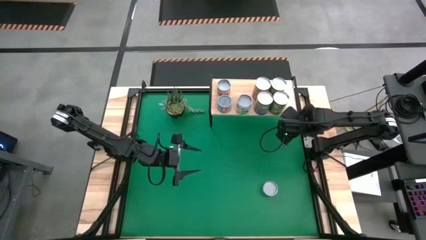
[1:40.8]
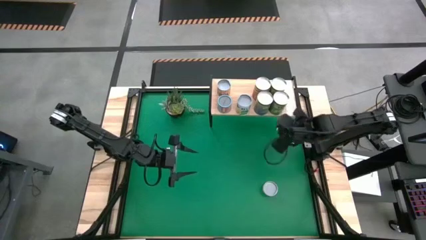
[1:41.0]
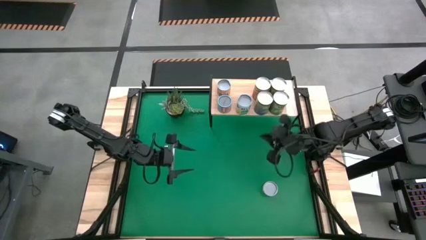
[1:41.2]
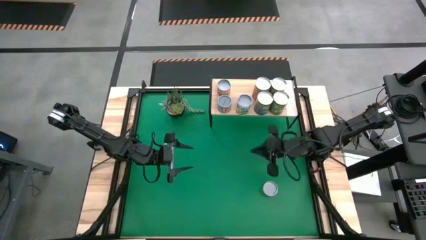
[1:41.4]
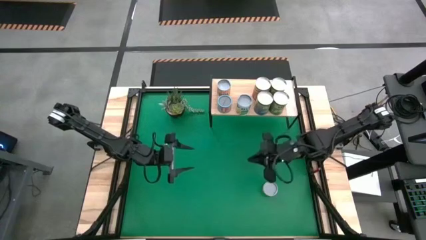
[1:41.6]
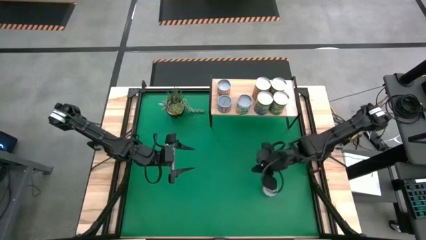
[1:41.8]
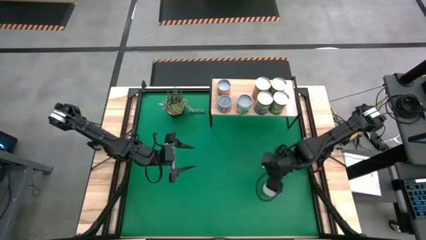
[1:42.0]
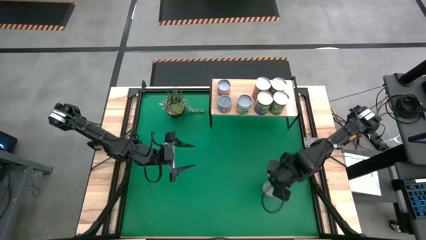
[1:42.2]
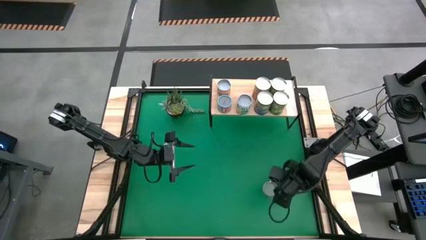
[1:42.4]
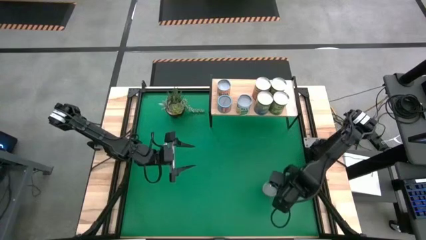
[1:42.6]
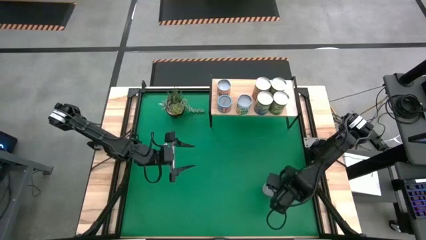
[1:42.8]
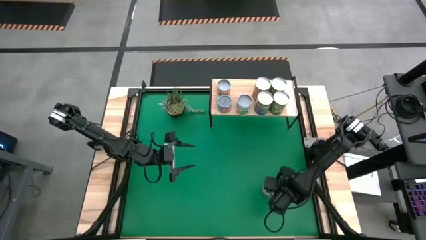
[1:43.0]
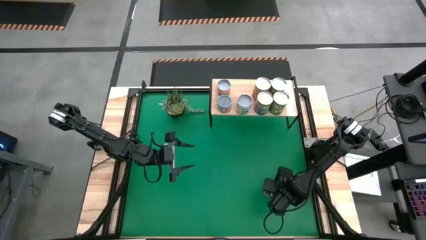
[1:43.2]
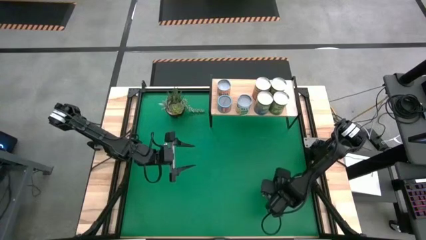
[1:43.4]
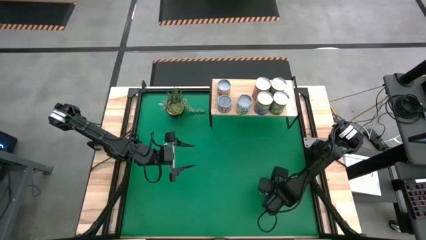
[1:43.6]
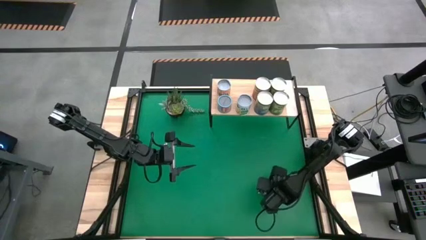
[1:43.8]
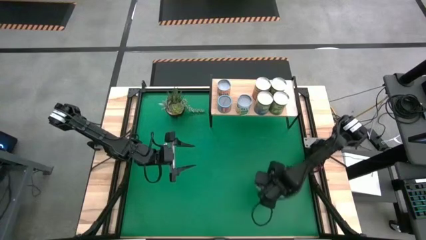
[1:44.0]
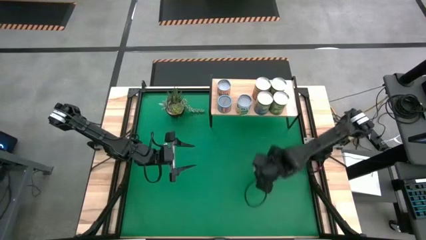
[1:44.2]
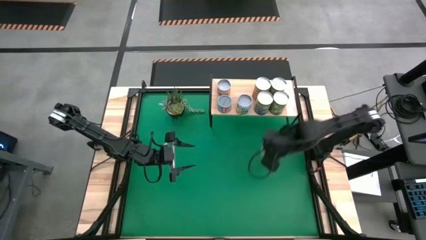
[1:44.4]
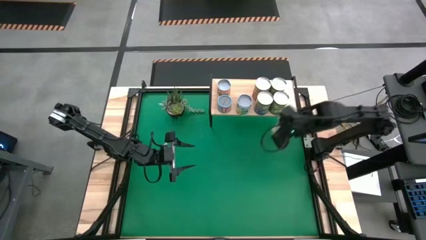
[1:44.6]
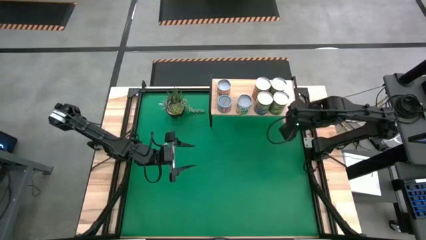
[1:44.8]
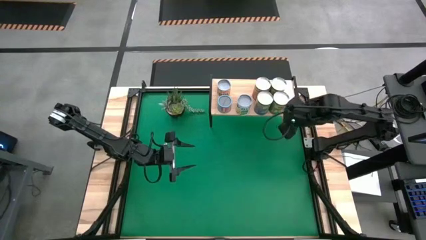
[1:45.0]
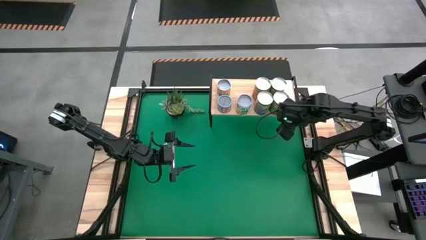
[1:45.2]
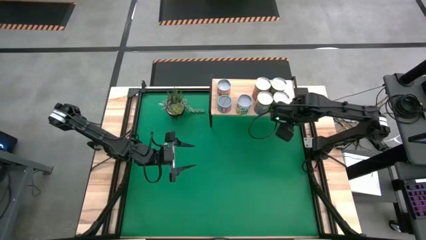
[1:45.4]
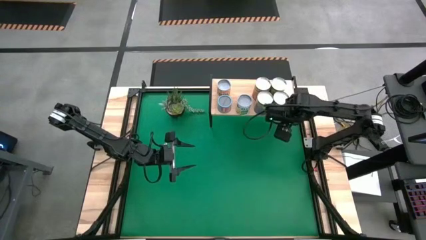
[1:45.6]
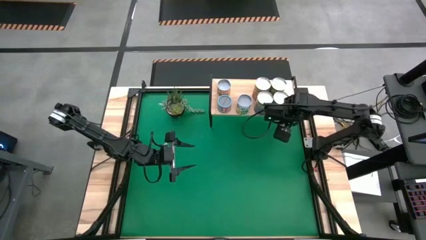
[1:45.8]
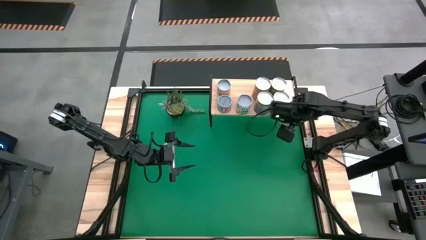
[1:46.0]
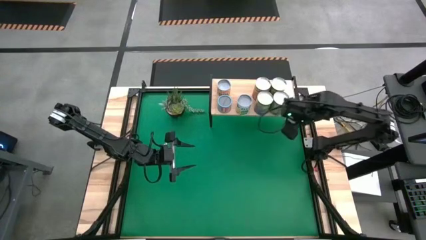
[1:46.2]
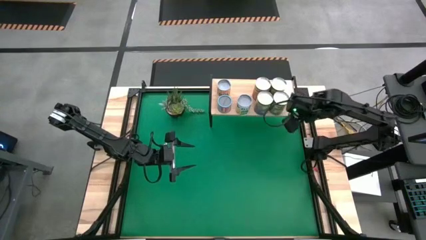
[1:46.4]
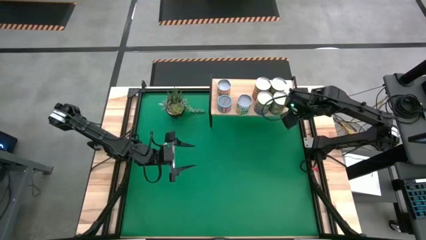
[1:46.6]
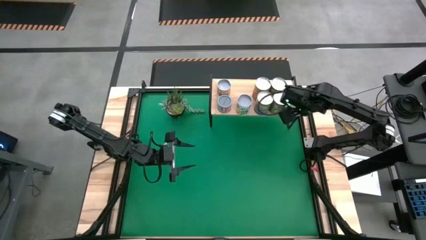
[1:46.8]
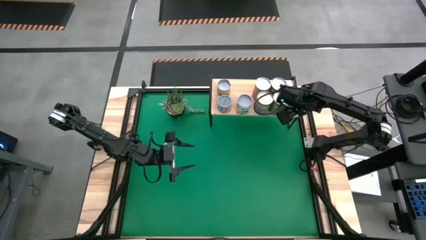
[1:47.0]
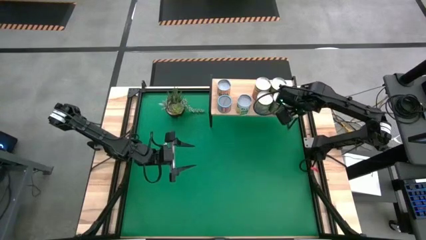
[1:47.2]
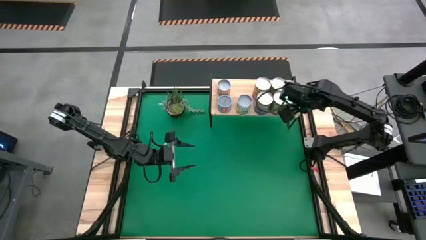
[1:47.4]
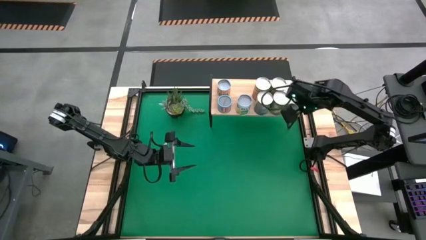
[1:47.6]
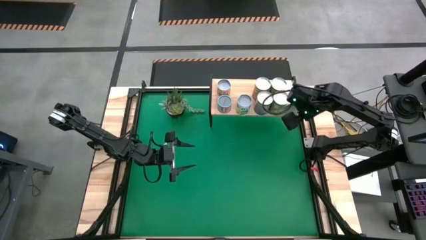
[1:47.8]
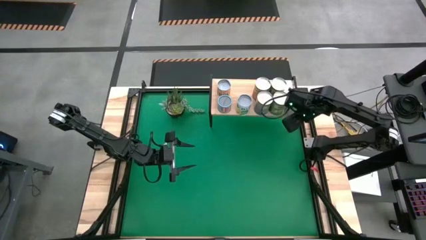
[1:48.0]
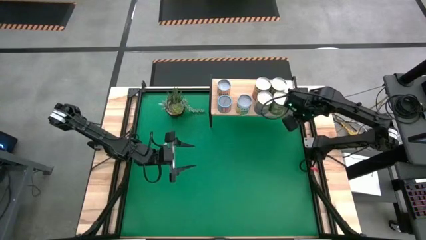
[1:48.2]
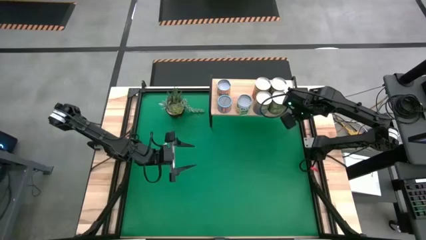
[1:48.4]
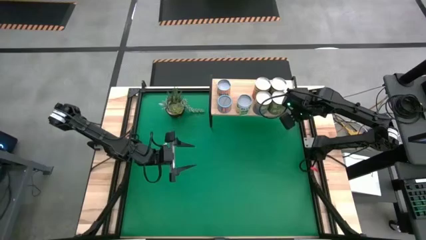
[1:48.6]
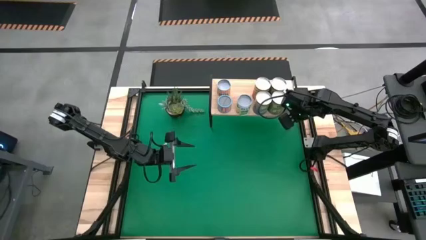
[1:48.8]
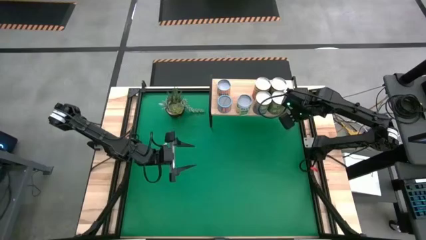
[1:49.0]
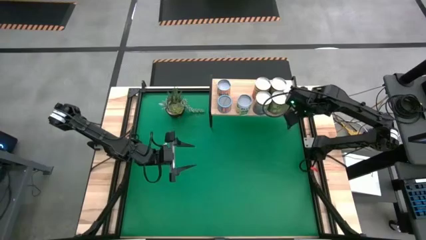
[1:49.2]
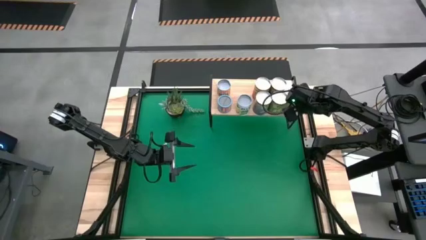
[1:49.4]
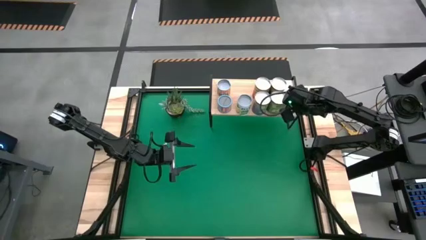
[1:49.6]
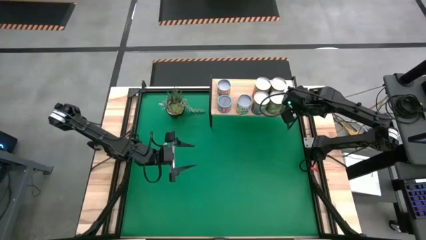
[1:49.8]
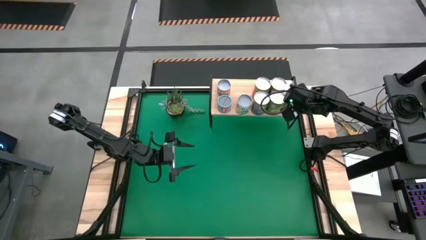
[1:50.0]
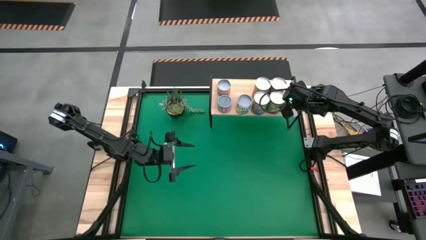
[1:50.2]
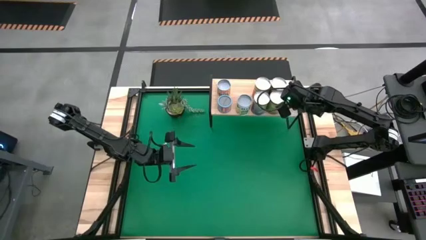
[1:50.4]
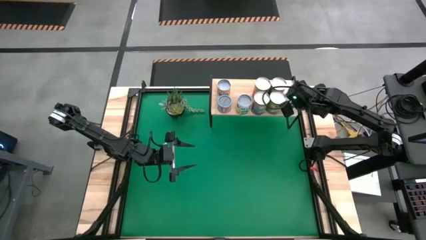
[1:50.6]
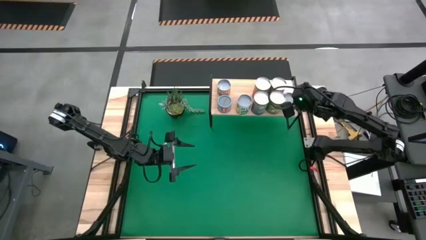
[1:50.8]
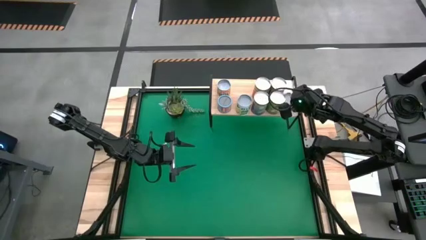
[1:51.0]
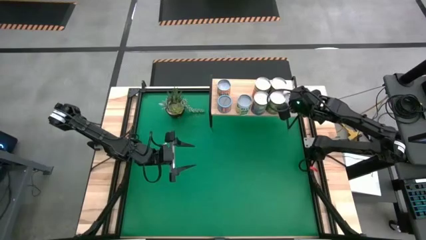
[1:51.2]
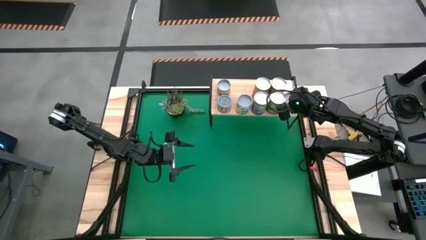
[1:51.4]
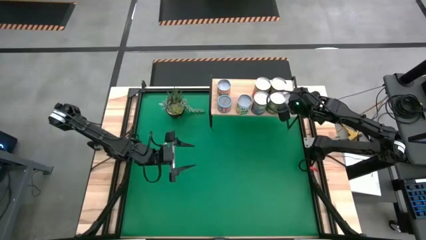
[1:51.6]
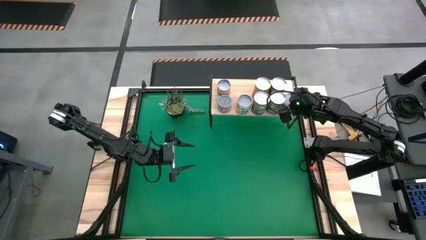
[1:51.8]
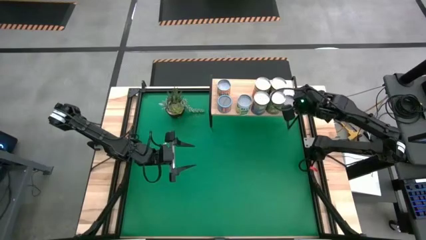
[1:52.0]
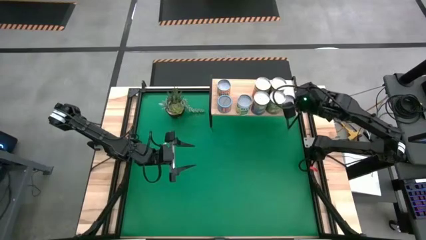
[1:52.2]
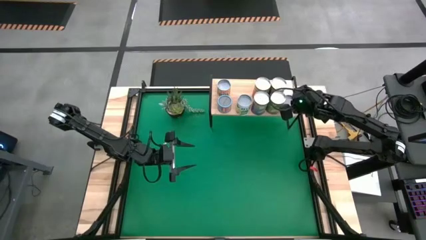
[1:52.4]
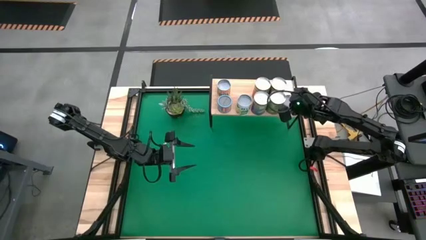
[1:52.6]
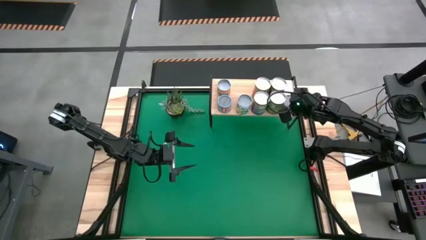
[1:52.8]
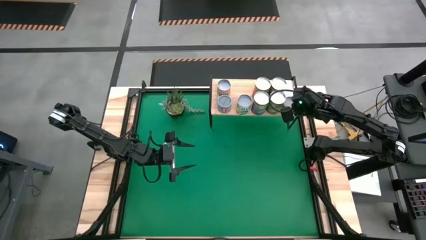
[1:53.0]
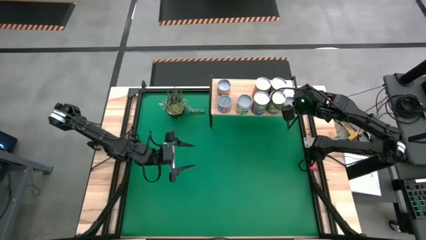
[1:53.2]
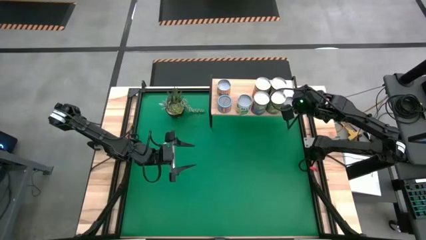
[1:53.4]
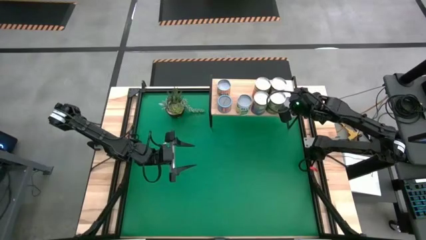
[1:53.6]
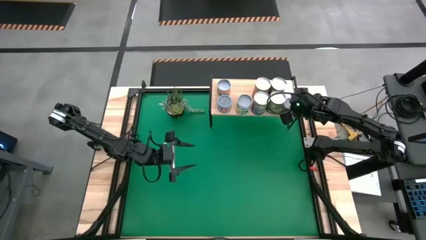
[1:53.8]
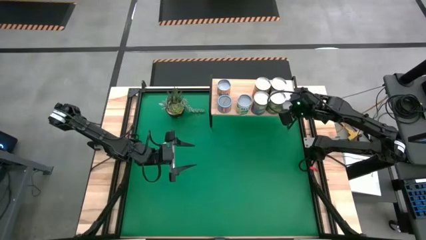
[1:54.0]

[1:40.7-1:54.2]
Task: Pick and place cans onto a shelf
Put the canned mushrooms on the shelf
